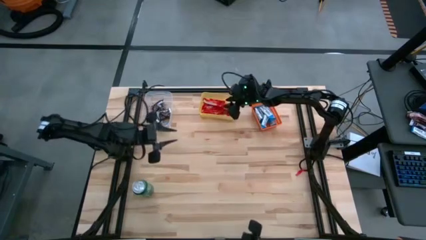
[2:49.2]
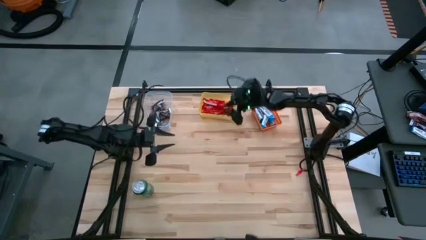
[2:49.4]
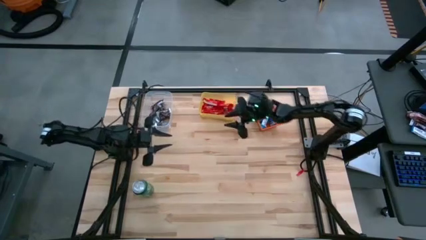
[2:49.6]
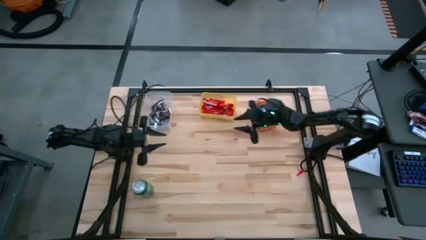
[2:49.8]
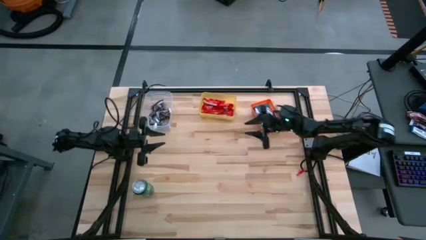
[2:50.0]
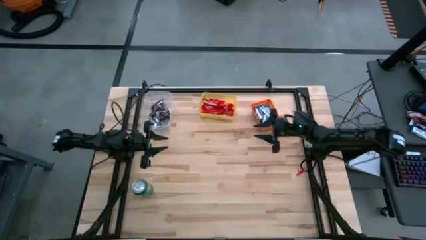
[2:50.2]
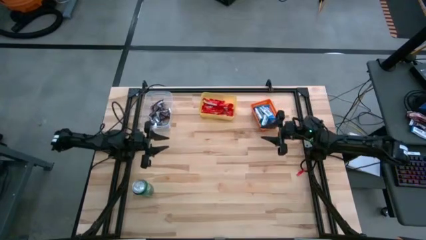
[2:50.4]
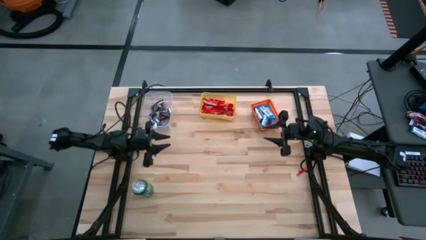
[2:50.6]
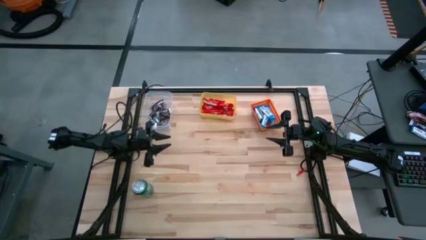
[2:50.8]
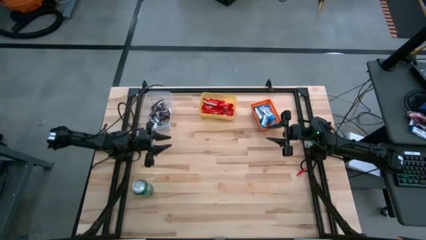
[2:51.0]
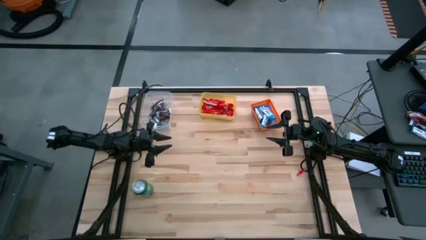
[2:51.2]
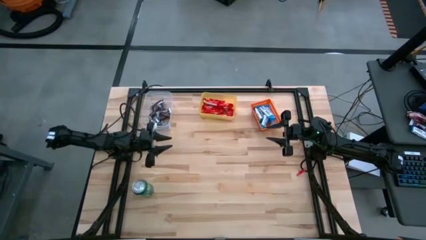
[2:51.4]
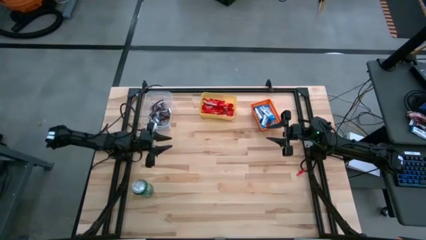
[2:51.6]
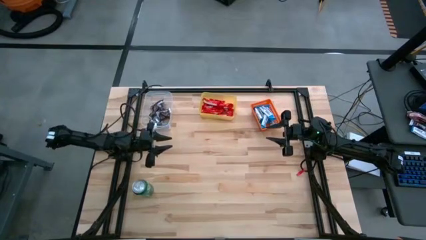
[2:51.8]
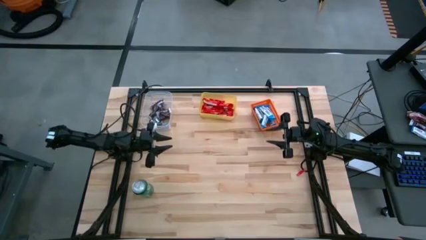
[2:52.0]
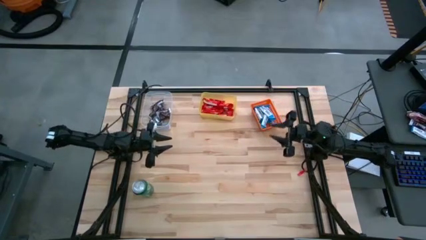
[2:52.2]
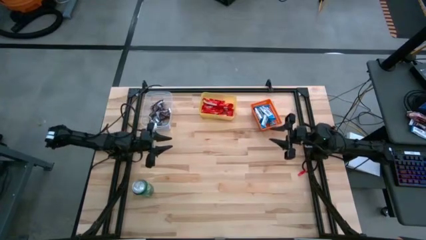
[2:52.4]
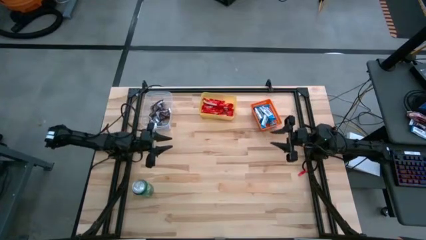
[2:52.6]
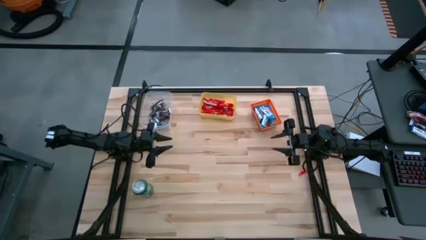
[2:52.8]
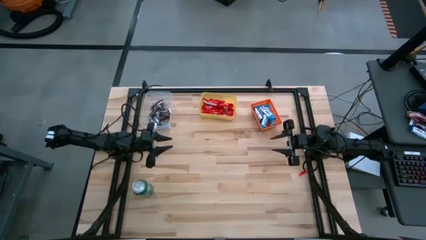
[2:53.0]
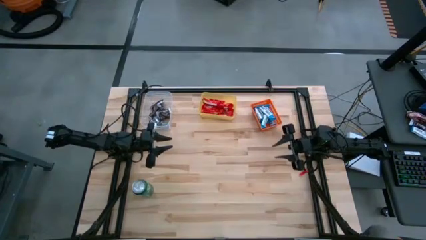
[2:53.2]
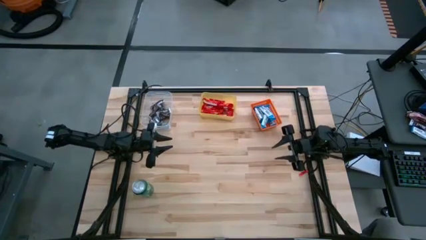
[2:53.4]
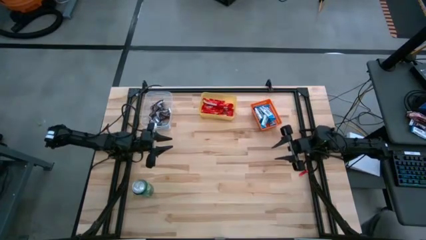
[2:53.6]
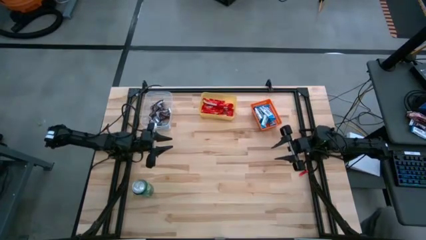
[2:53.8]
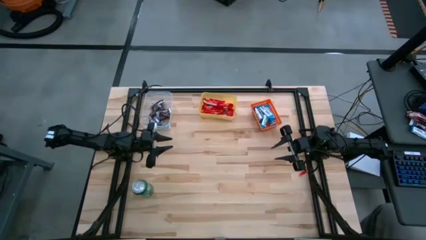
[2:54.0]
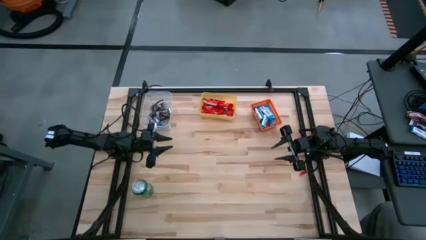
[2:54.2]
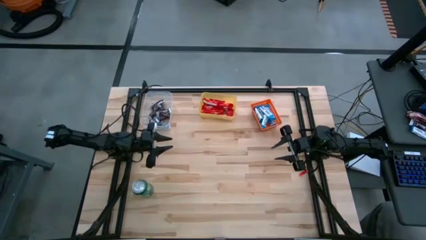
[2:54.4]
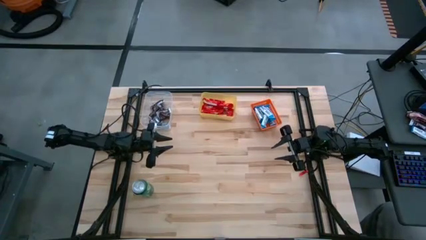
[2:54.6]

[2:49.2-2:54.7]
Task: Sort candy
Return to Home Position

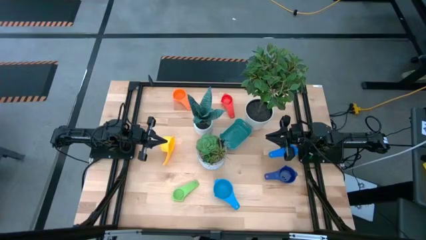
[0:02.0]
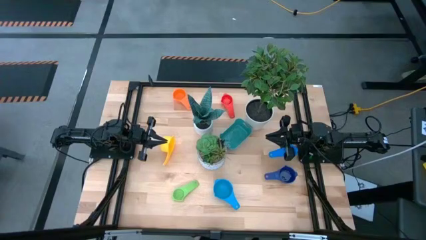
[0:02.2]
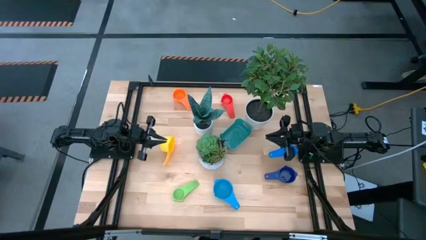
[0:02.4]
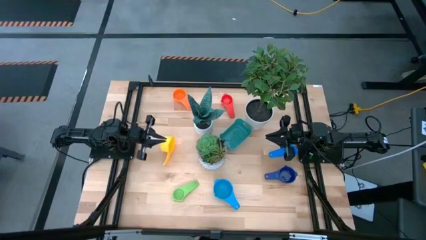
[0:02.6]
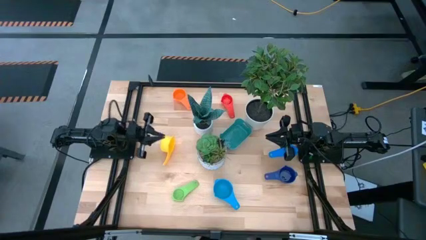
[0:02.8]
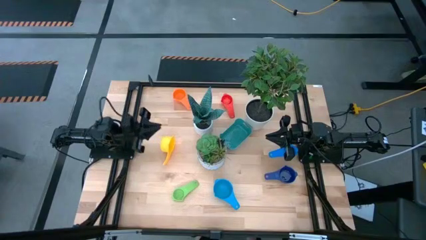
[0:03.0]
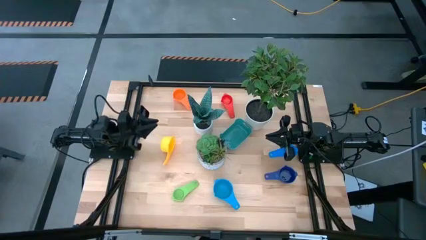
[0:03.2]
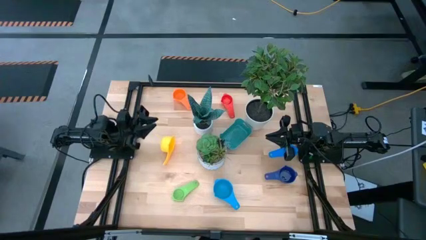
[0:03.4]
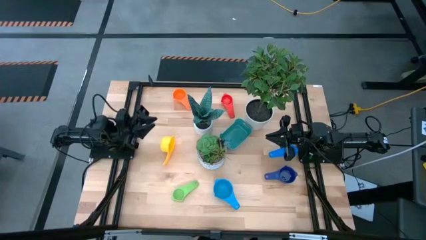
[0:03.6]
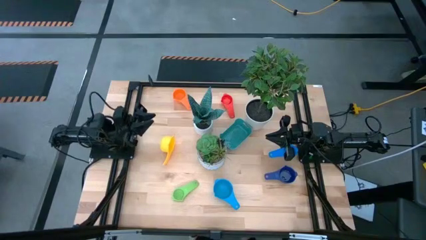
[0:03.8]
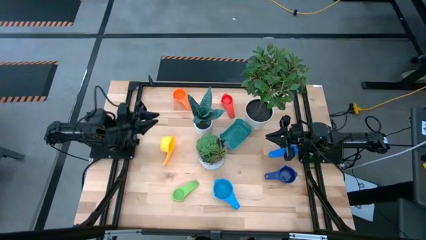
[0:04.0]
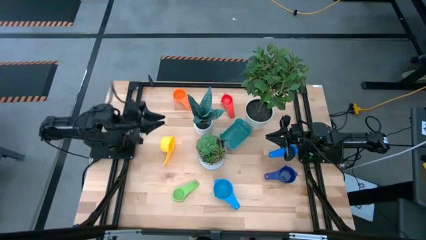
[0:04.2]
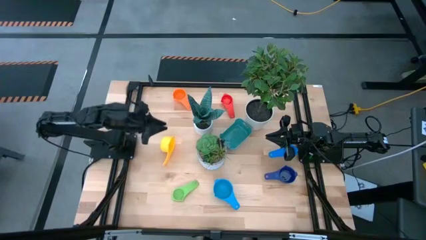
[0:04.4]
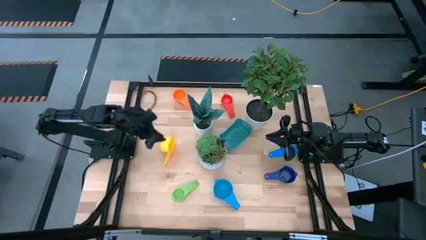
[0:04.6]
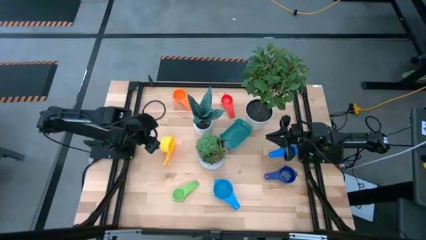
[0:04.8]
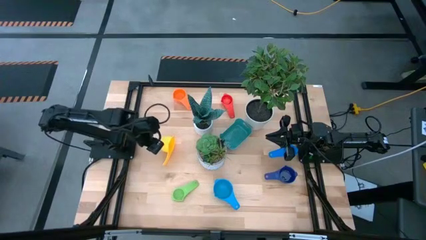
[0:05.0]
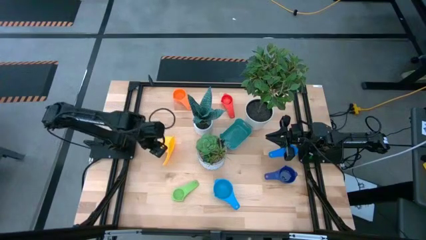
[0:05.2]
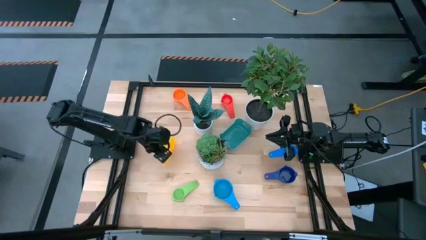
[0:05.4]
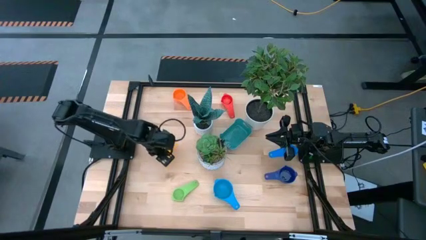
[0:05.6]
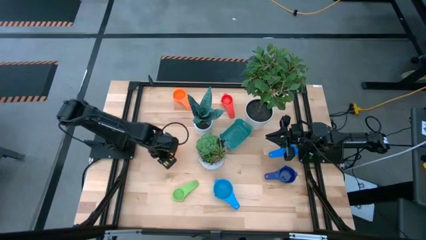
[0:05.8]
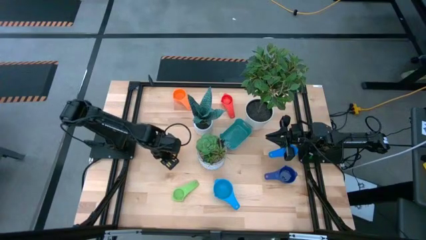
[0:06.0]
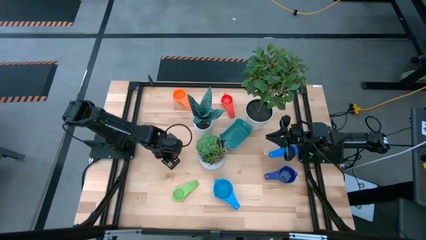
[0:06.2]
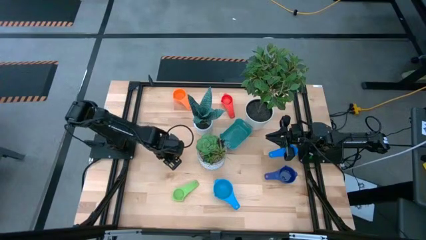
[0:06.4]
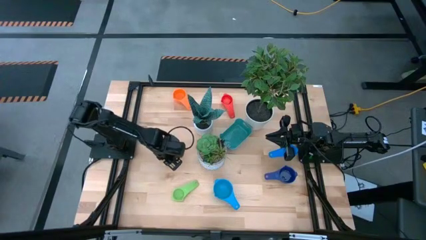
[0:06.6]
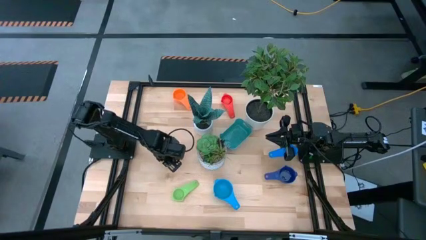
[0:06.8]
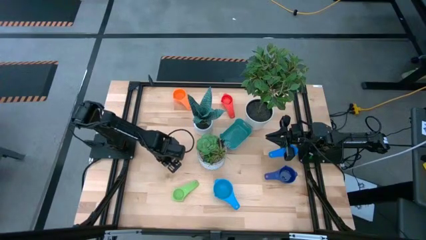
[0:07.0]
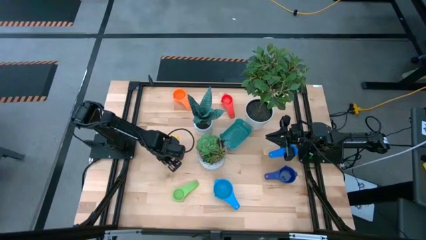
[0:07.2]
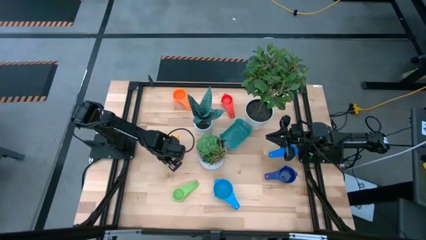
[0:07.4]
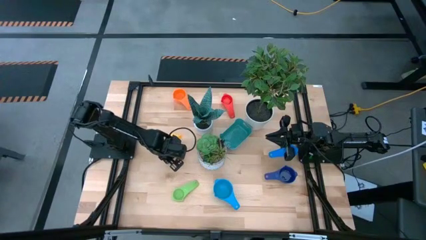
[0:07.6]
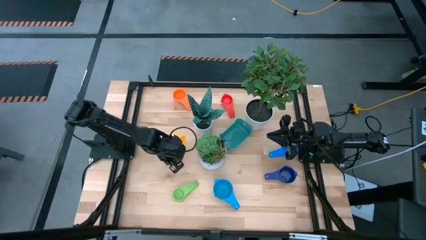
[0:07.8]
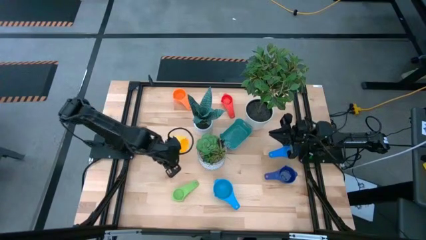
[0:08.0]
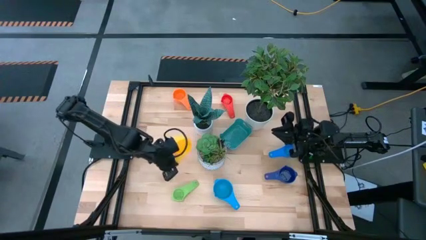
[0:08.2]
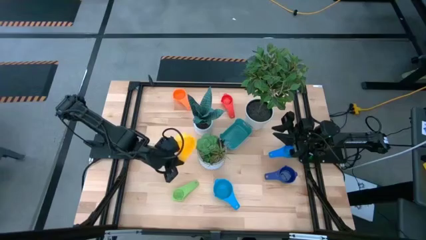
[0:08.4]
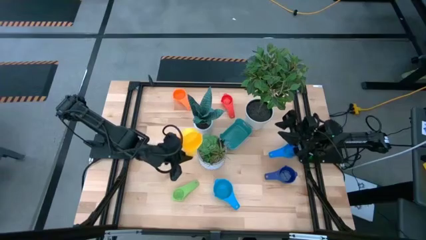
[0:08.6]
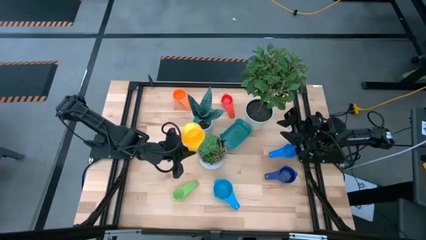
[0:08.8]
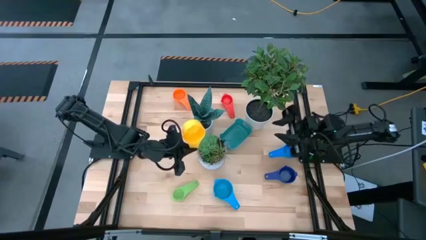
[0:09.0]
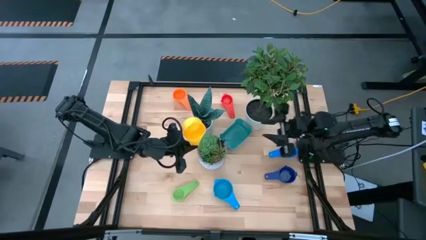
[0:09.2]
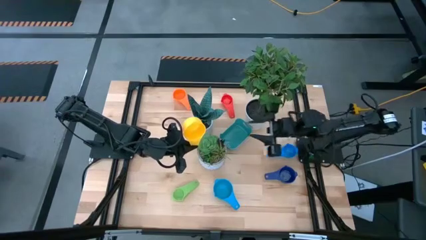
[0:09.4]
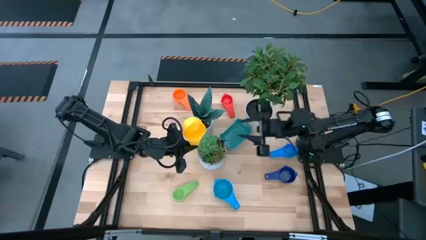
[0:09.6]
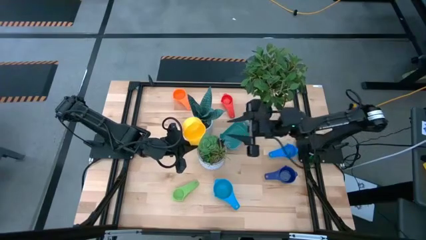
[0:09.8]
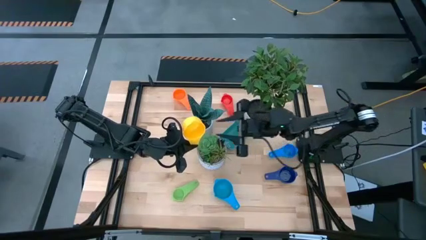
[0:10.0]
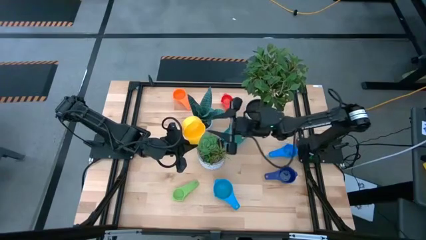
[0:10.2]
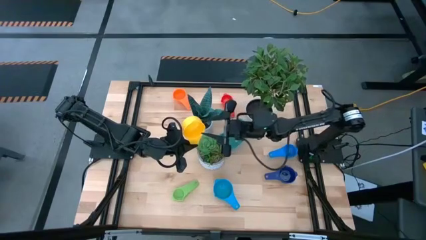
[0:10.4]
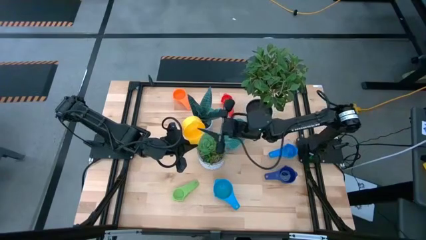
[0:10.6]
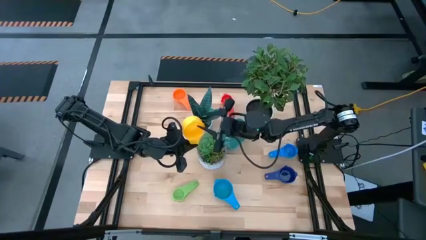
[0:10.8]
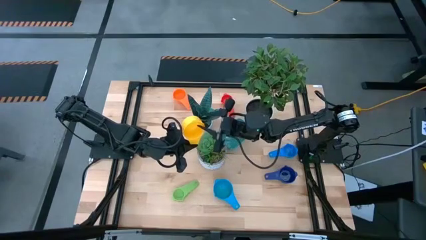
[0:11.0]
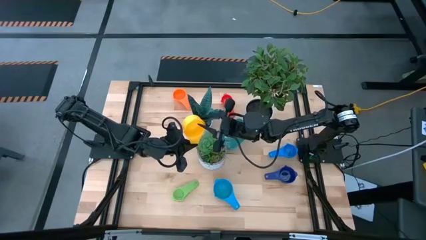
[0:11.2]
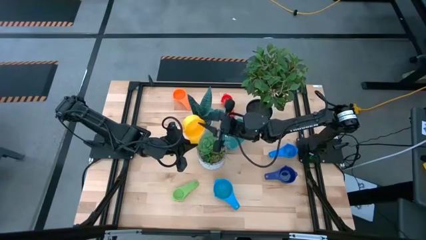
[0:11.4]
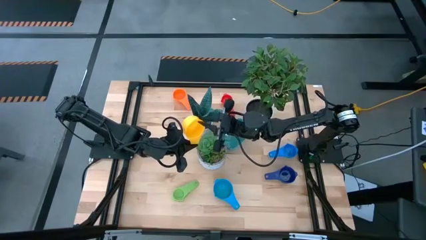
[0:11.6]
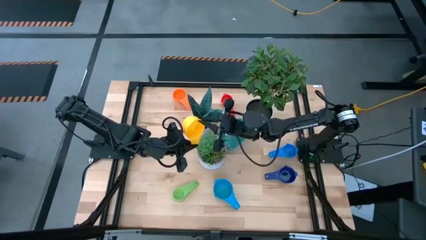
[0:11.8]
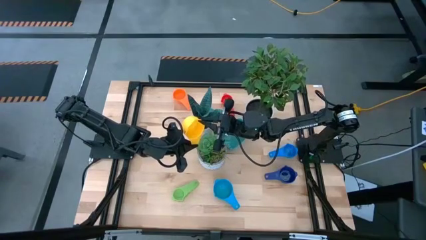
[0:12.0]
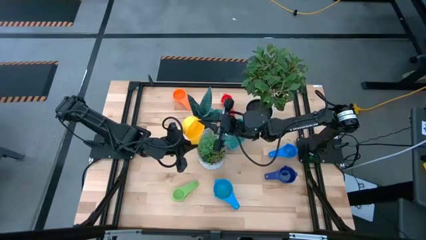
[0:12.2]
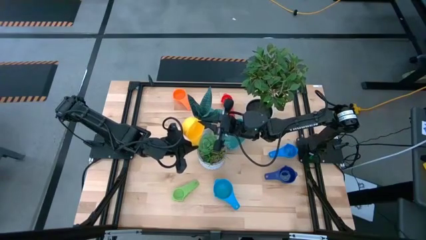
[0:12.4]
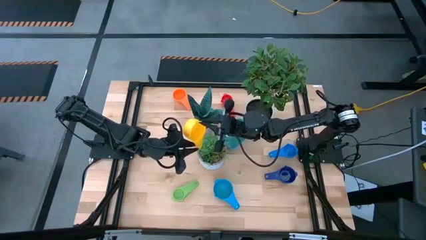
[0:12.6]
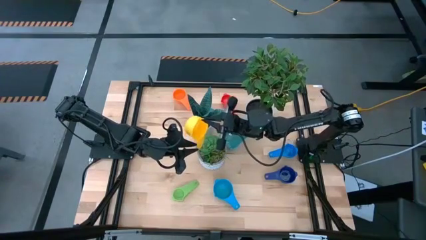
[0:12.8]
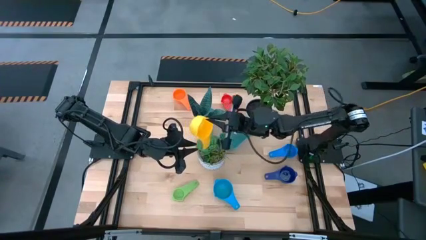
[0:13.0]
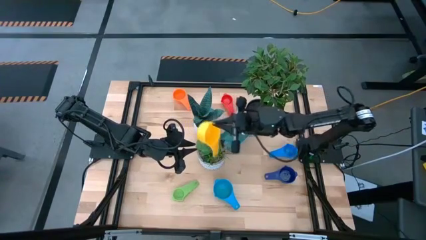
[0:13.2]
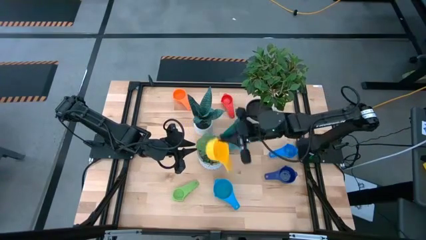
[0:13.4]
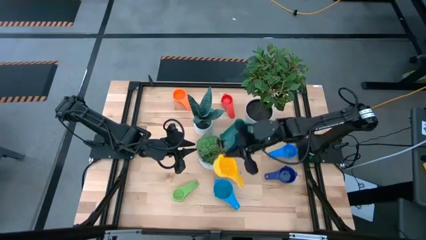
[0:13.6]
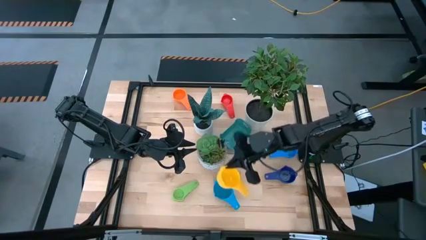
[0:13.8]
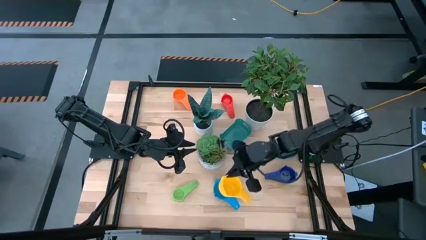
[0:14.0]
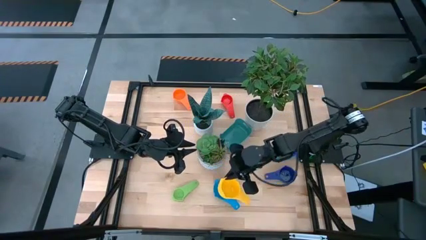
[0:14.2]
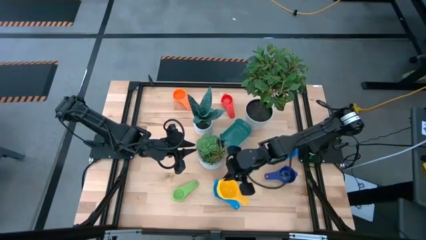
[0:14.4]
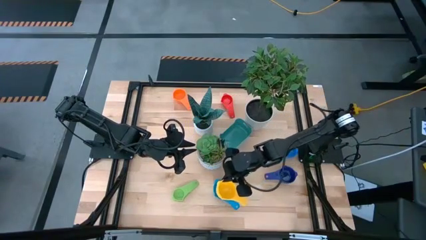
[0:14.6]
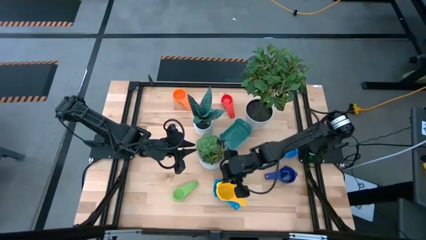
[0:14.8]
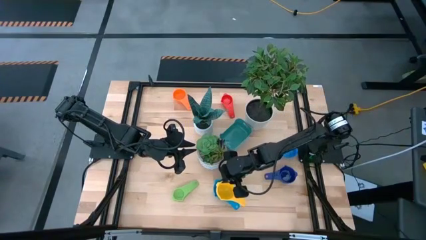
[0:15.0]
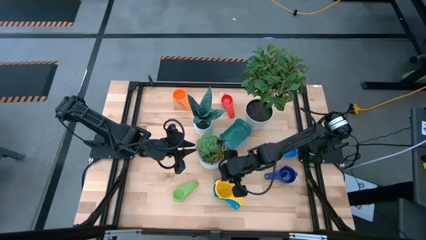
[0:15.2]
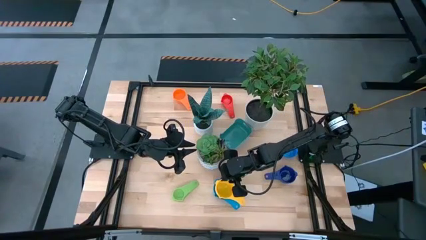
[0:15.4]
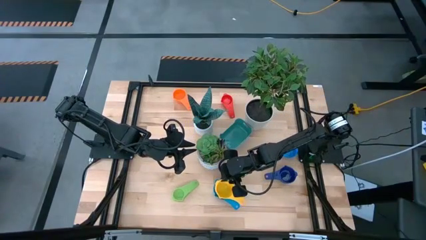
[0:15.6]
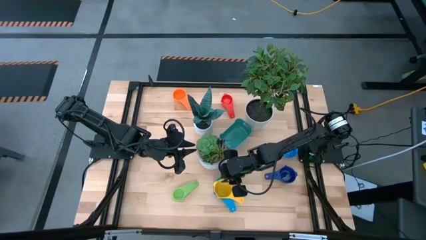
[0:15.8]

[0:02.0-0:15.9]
Task: Nest measuring cups in basket
Stack the yellow measuring cup on top of the left blue measuring cup
